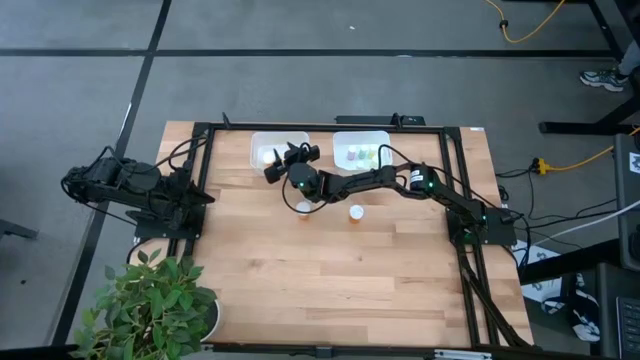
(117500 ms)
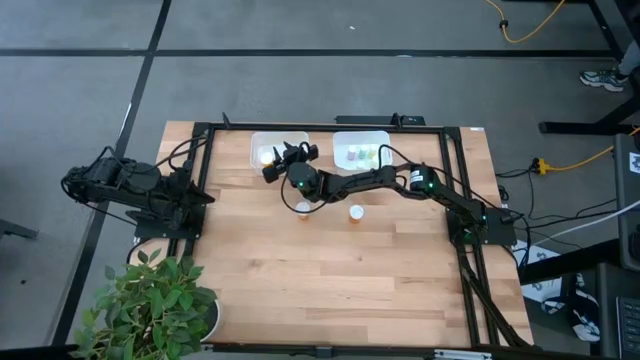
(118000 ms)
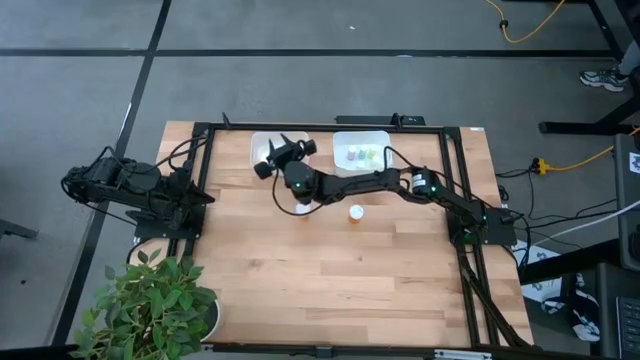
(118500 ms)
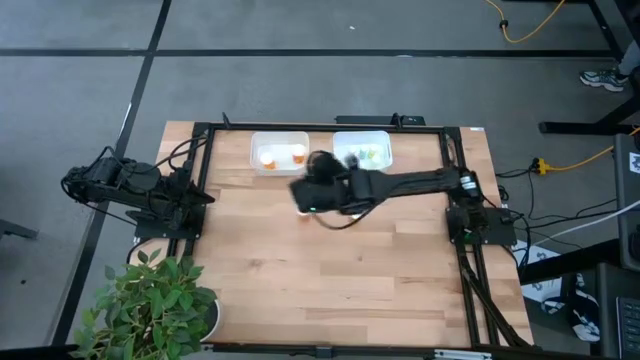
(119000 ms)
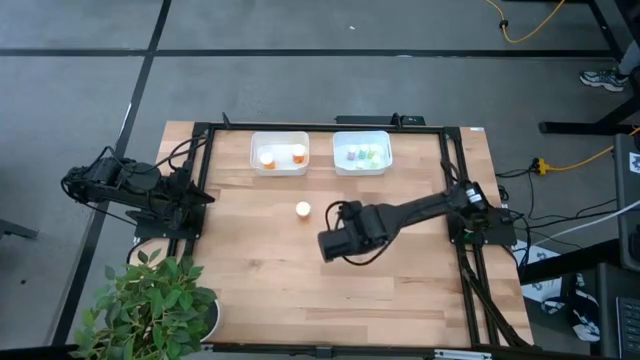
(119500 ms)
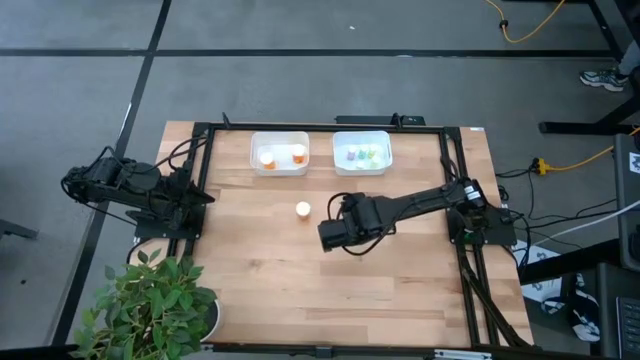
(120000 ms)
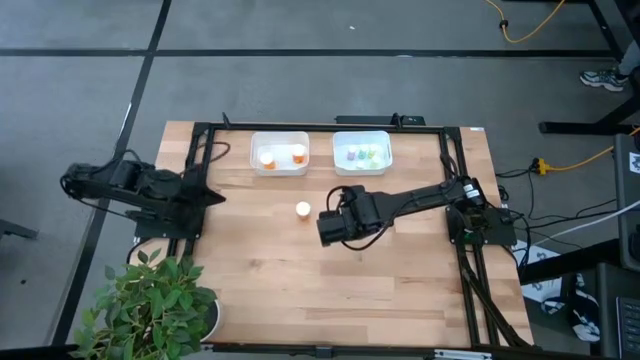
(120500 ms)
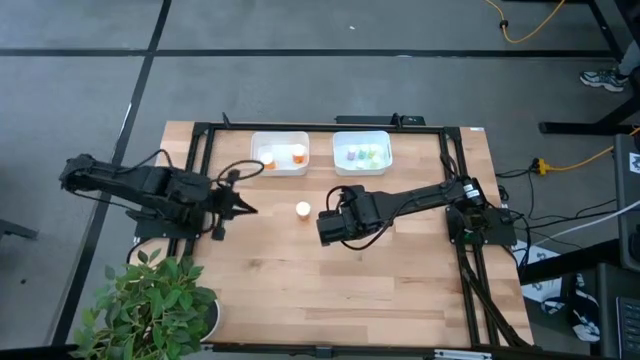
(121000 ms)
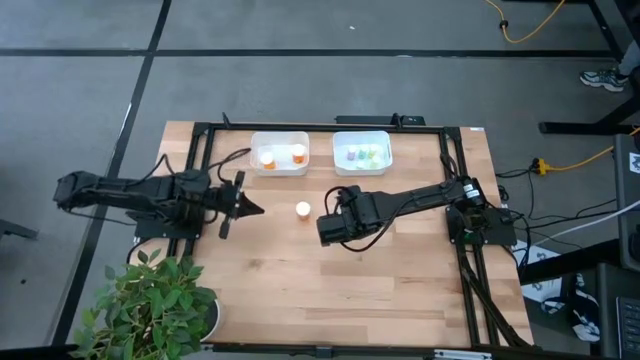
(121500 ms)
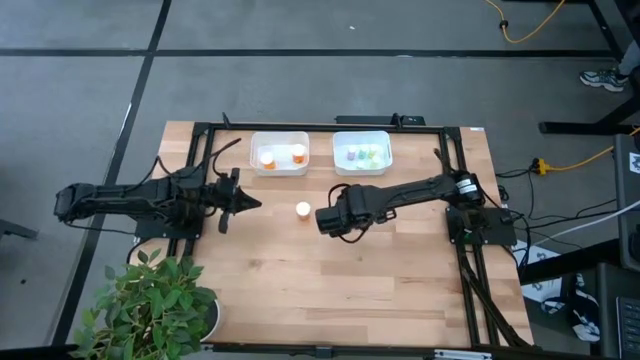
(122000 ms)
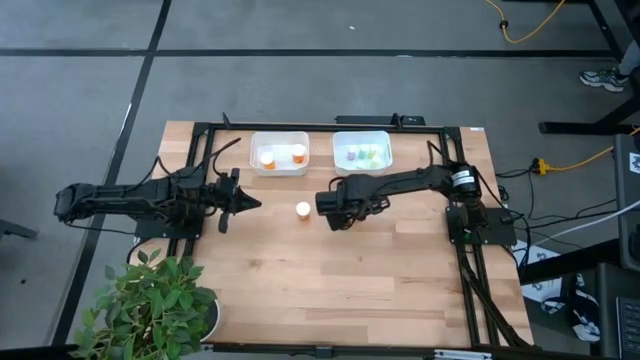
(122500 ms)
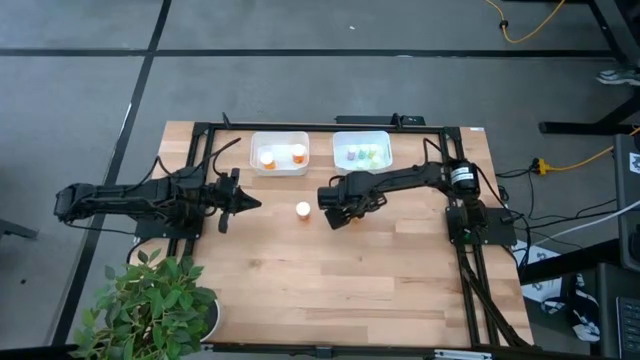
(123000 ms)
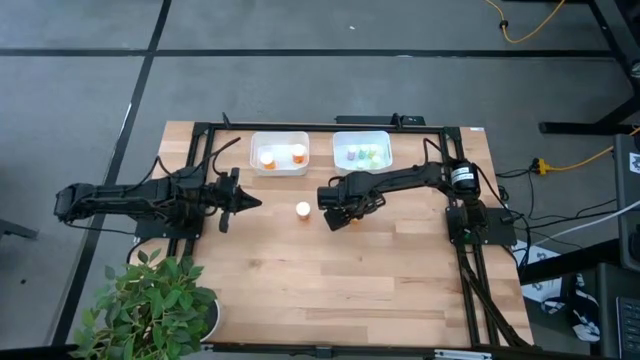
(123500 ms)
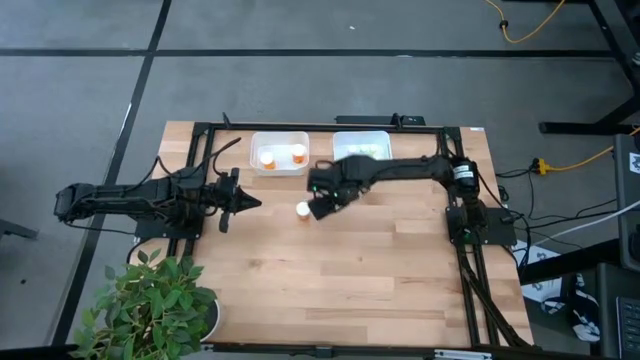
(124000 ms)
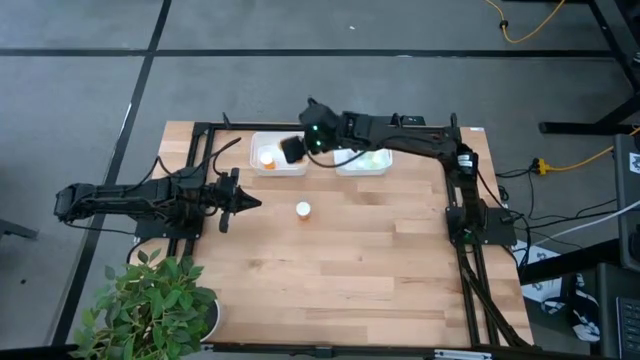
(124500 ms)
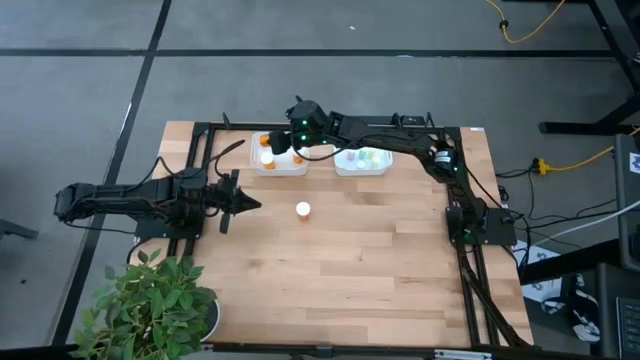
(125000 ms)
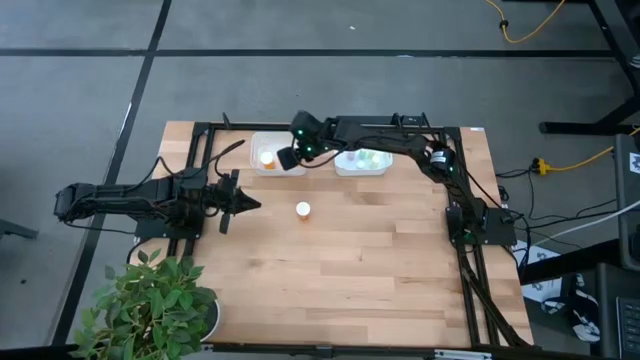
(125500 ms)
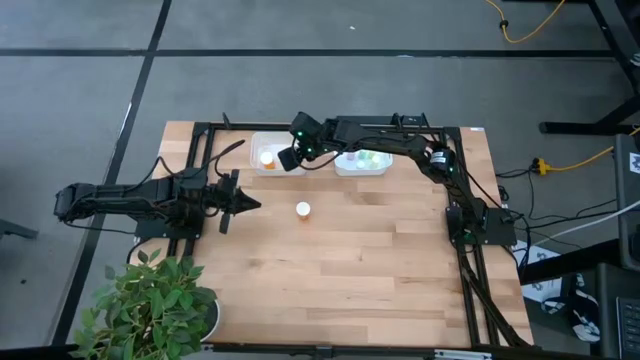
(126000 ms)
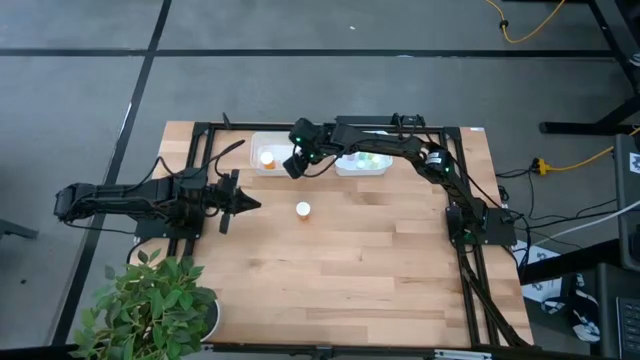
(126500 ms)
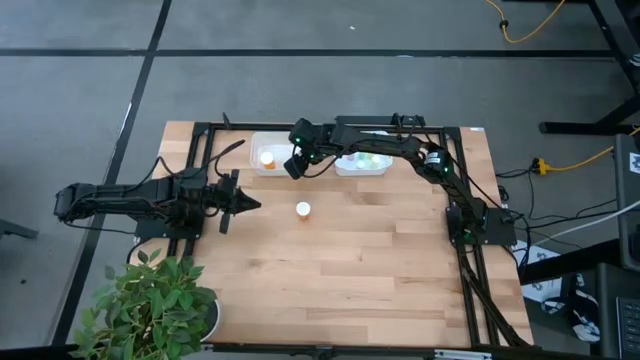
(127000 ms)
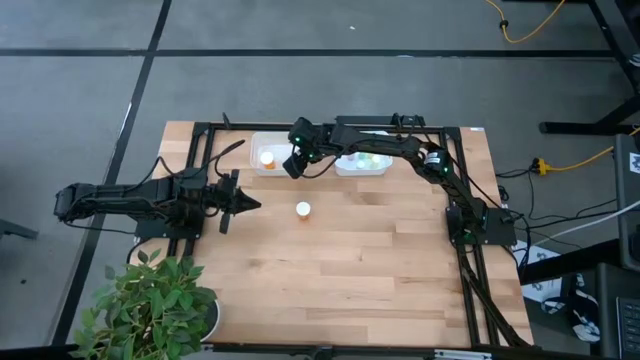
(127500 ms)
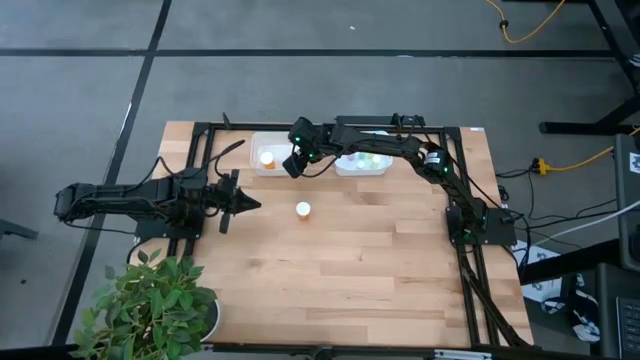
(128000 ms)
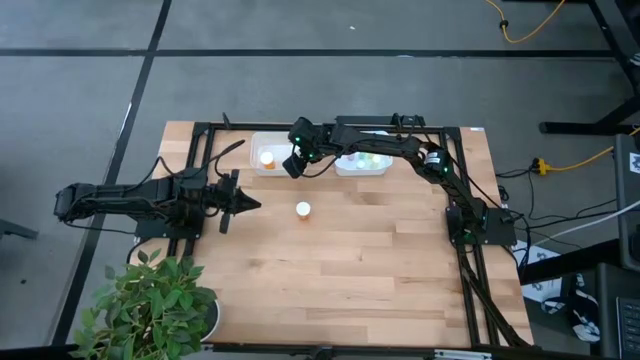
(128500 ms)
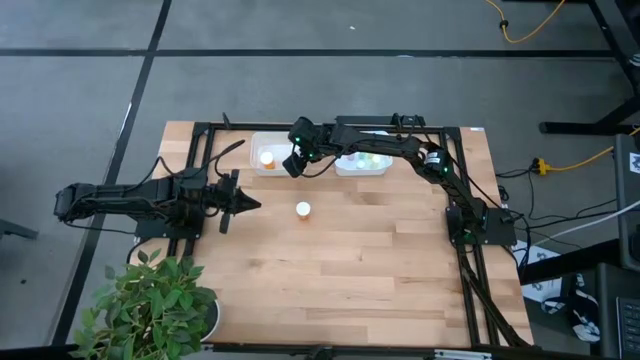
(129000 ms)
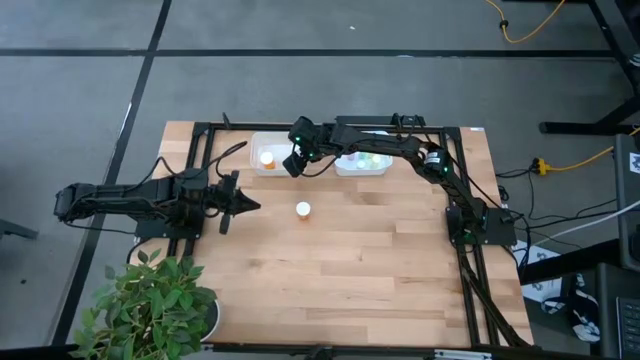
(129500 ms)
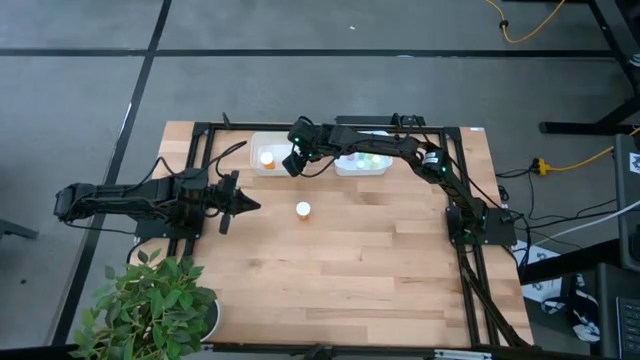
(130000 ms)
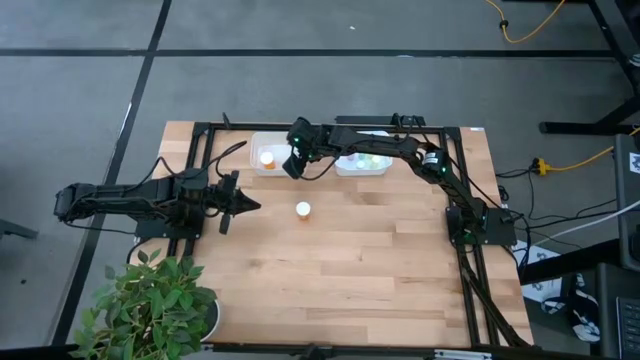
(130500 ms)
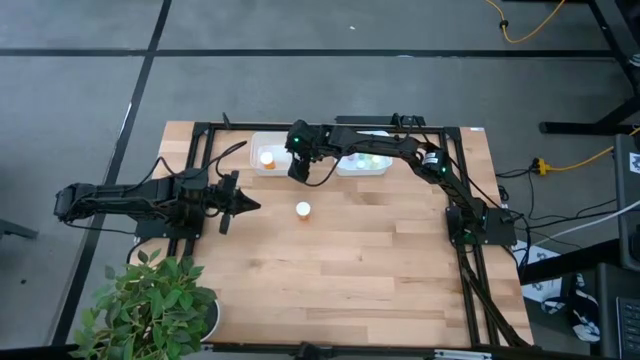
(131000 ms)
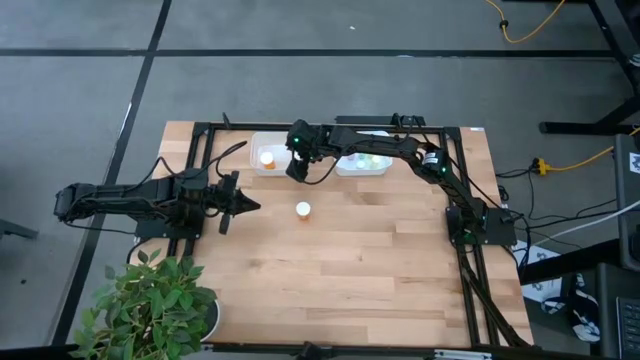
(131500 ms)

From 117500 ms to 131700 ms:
Task: Pick and place medicine bottles into bin by pill shape (circle, oval)
Put the orange pill bottle into the left white bin
